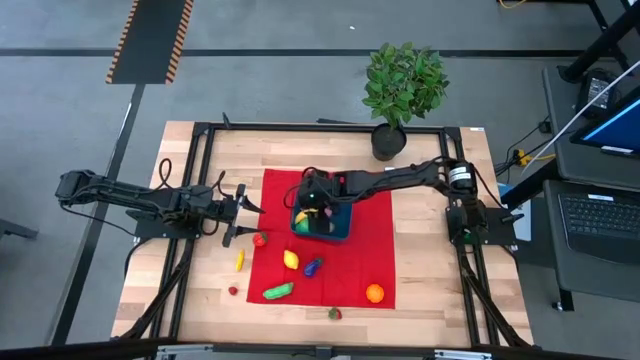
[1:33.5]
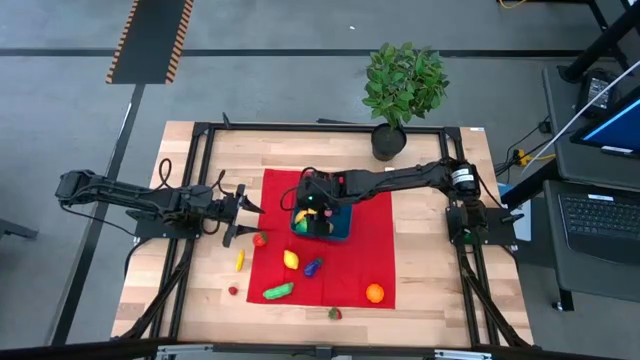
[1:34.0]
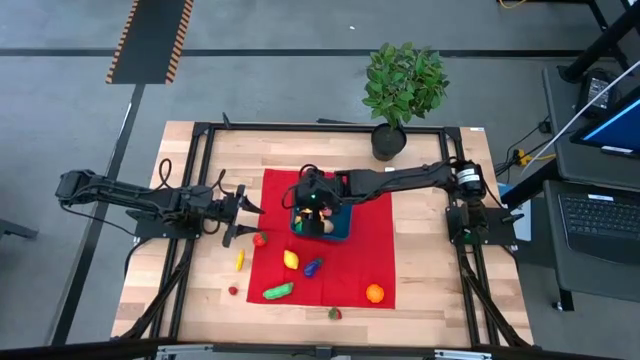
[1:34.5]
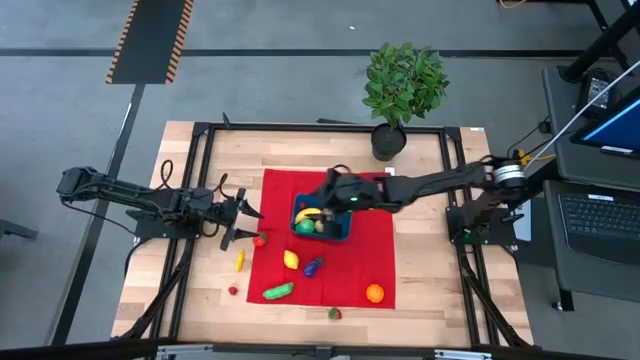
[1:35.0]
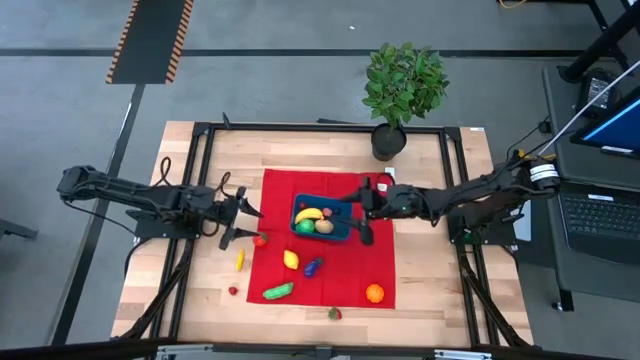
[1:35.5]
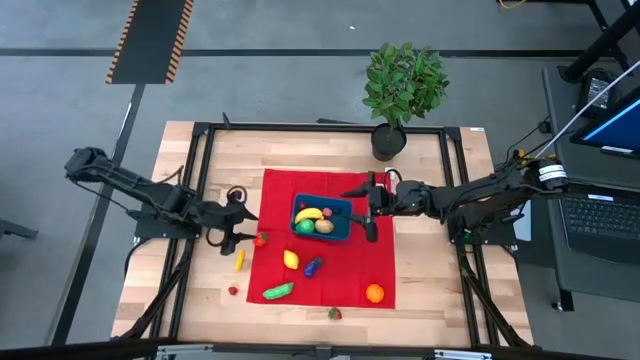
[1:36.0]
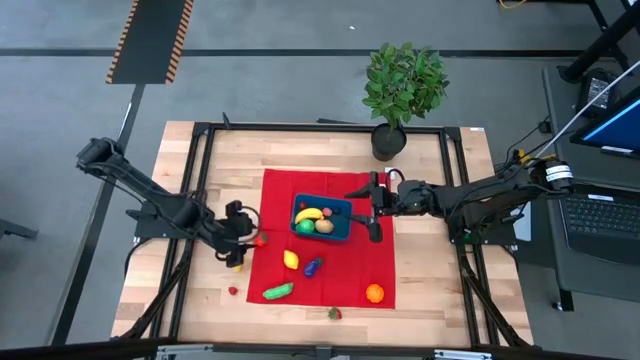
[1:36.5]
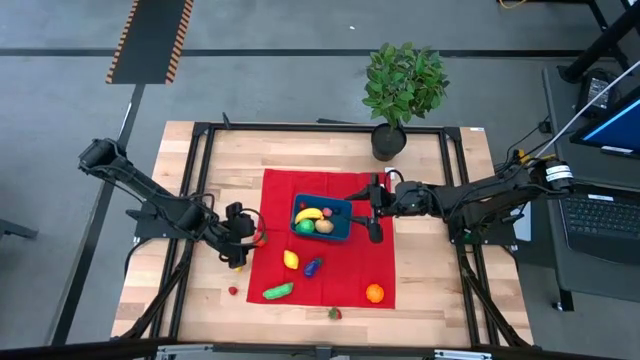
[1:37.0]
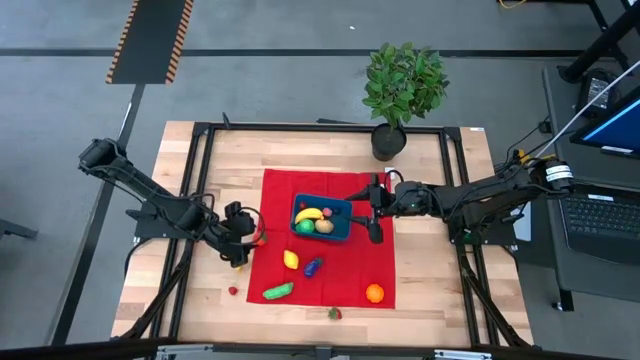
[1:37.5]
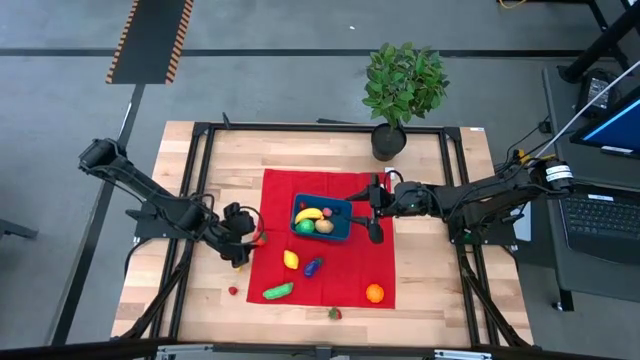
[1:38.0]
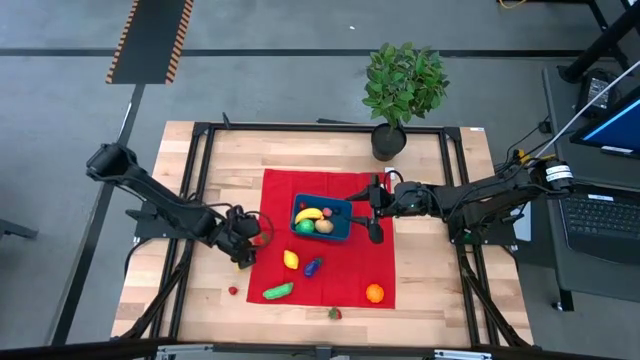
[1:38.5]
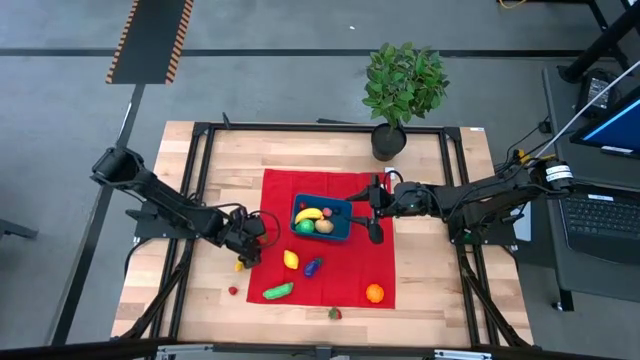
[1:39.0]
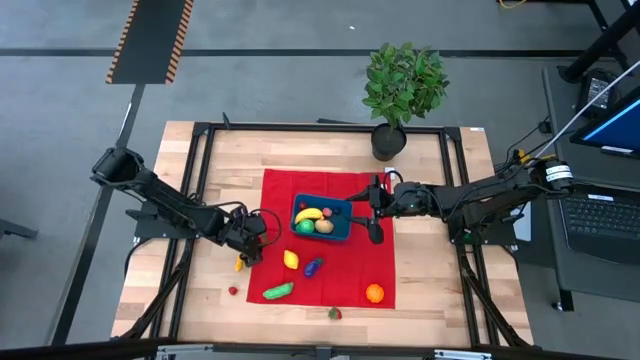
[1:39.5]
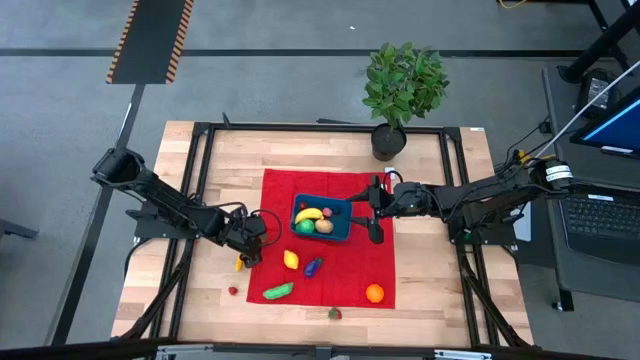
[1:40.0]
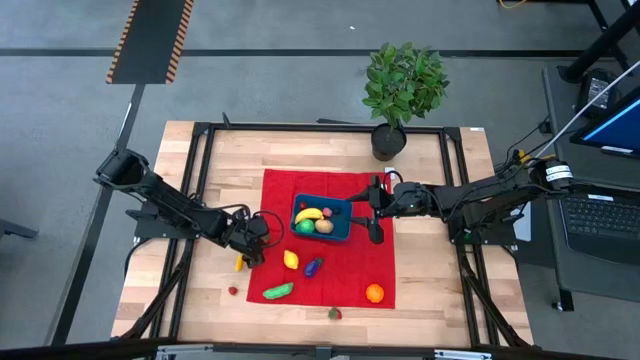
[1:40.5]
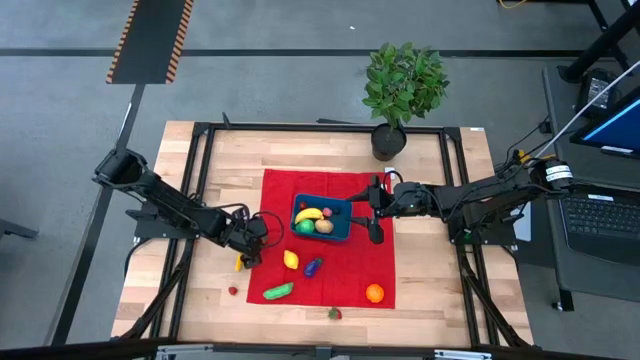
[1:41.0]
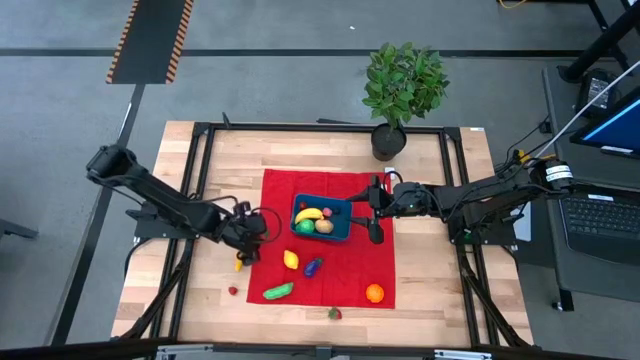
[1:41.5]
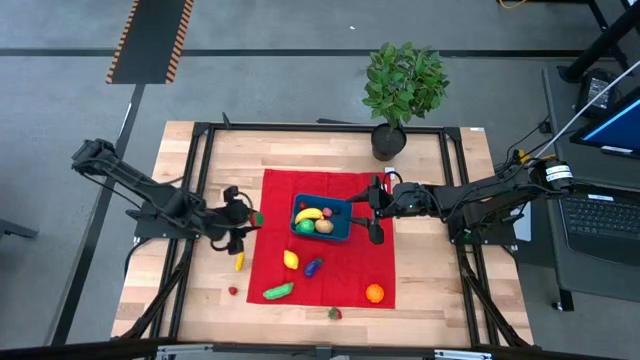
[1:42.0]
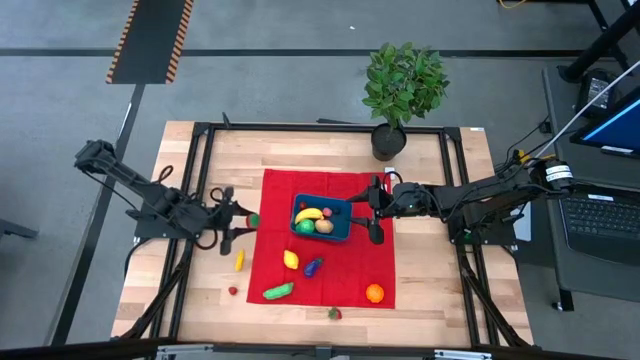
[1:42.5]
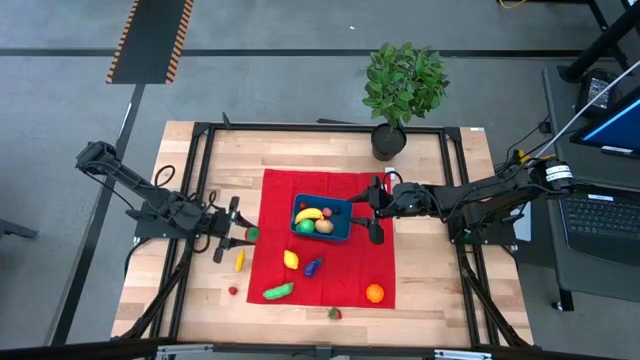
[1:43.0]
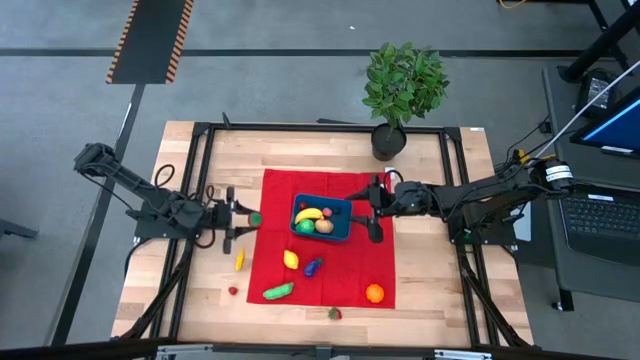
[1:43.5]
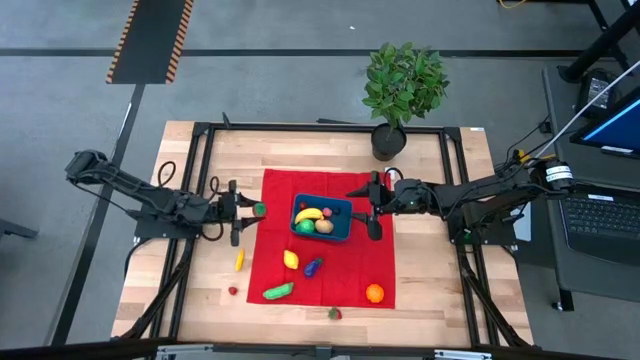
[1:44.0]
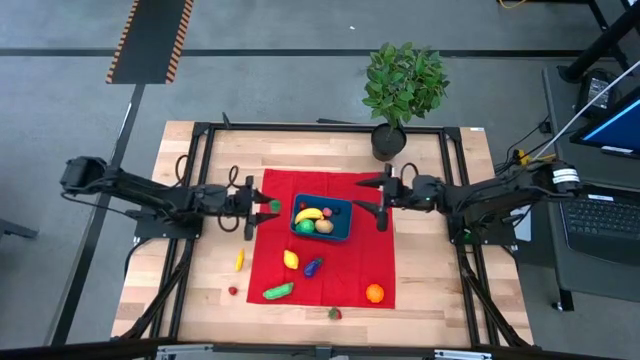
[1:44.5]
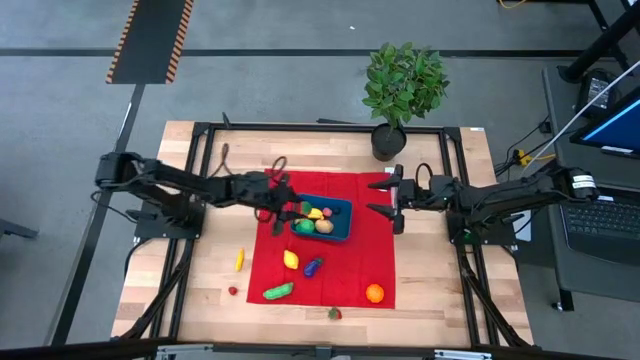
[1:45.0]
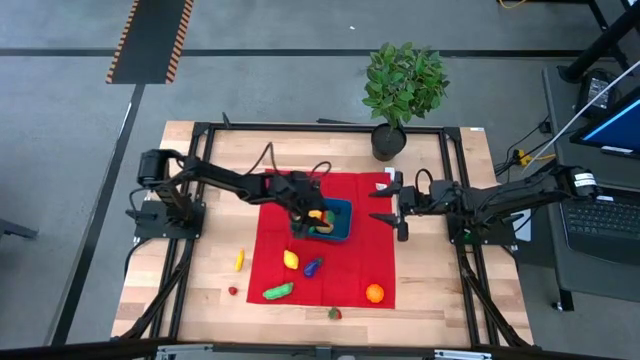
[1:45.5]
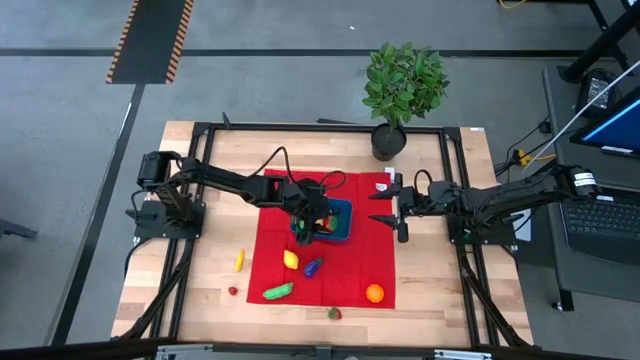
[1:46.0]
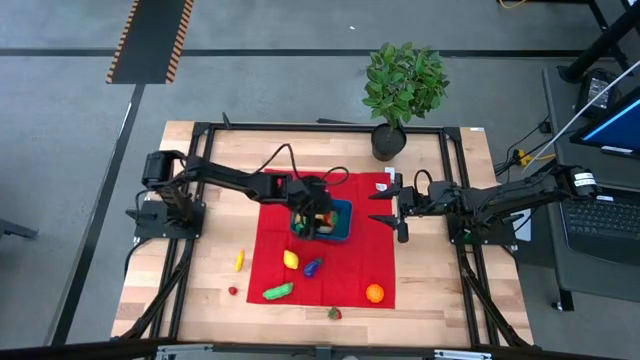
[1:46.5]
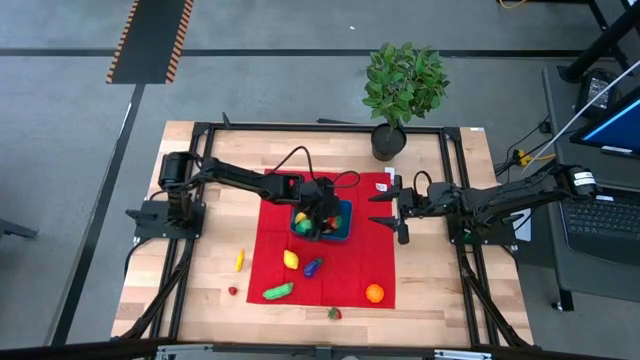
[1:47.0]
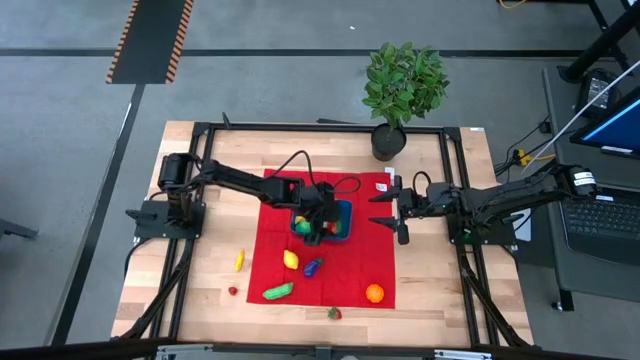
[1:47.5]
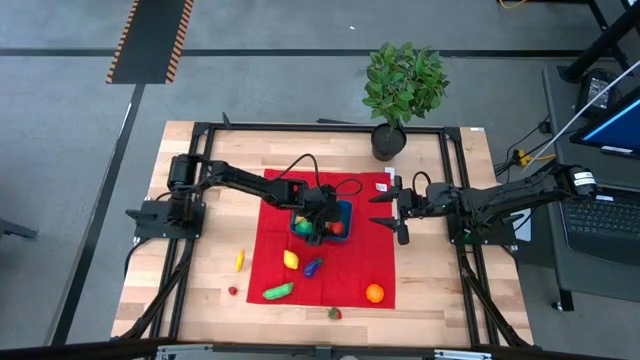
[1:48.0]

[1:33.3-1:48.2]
Task: Pick and placing Produce into tupperware
Put the left red strawberry into the blue bin

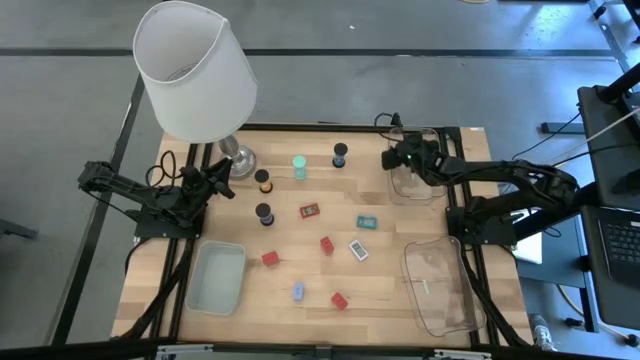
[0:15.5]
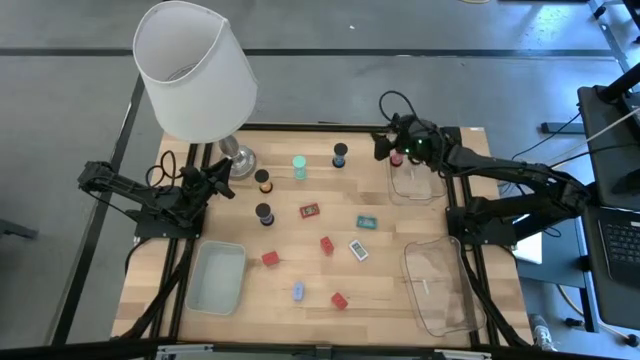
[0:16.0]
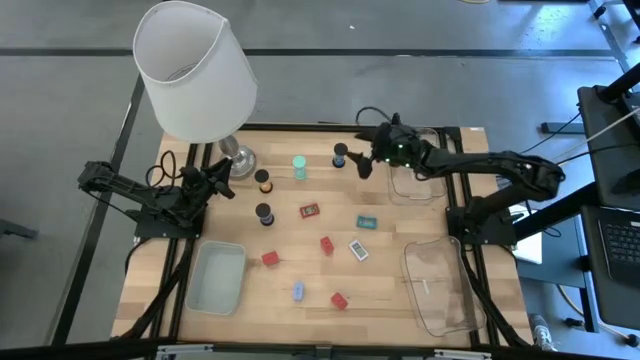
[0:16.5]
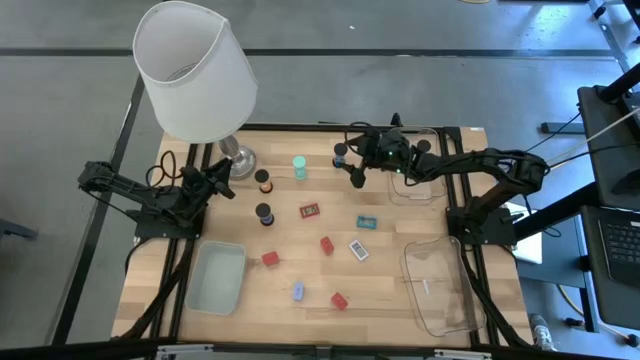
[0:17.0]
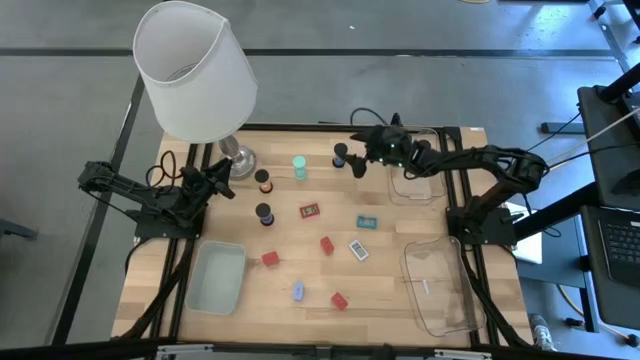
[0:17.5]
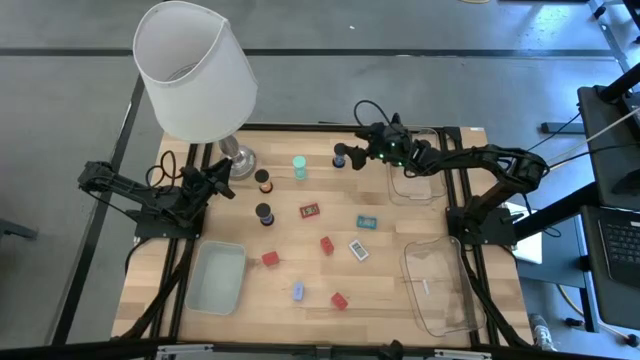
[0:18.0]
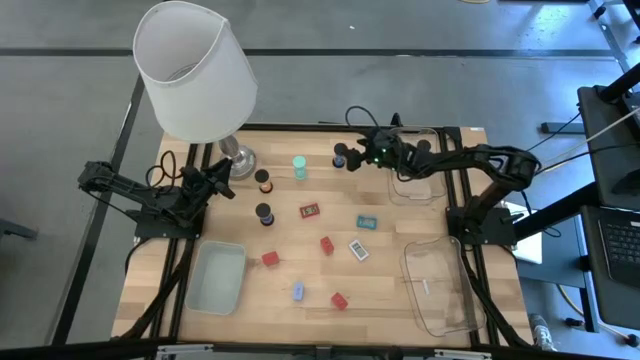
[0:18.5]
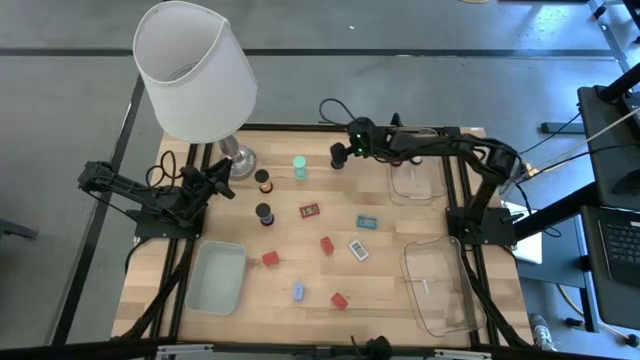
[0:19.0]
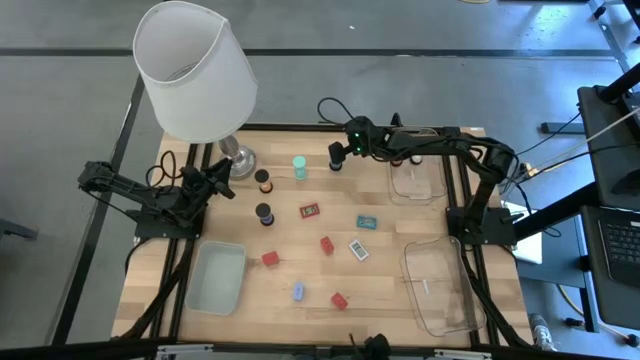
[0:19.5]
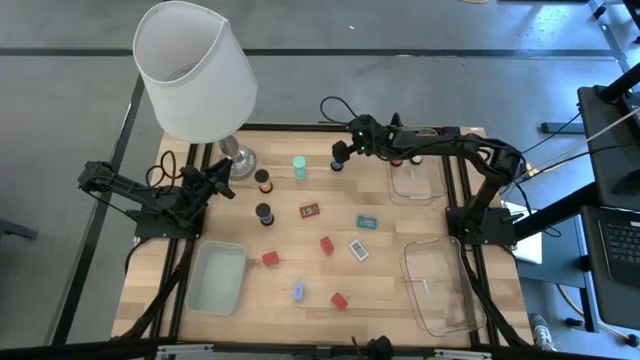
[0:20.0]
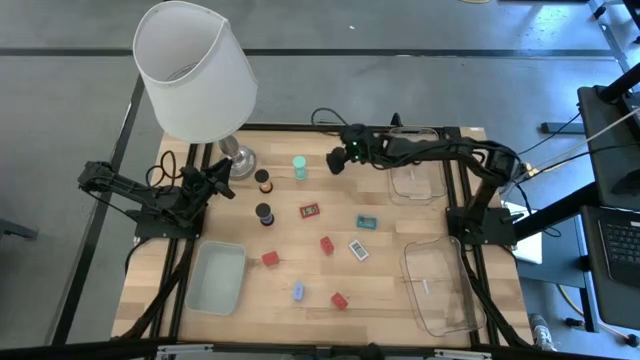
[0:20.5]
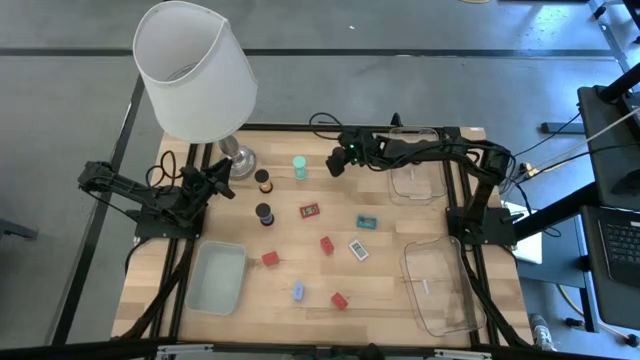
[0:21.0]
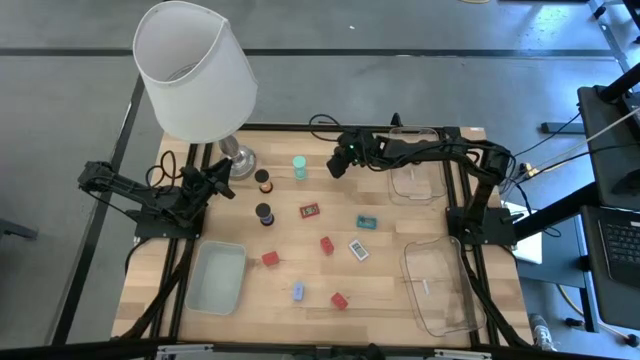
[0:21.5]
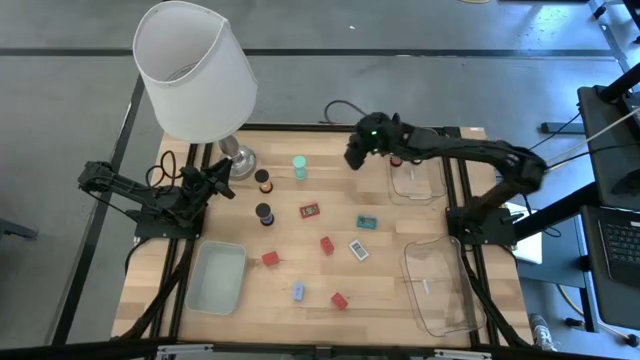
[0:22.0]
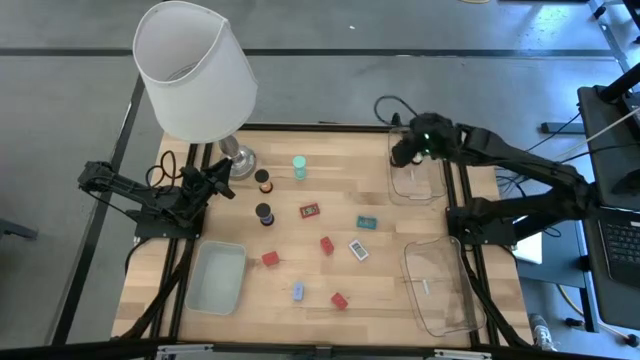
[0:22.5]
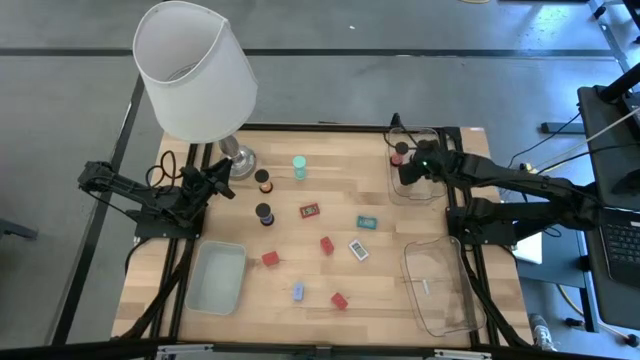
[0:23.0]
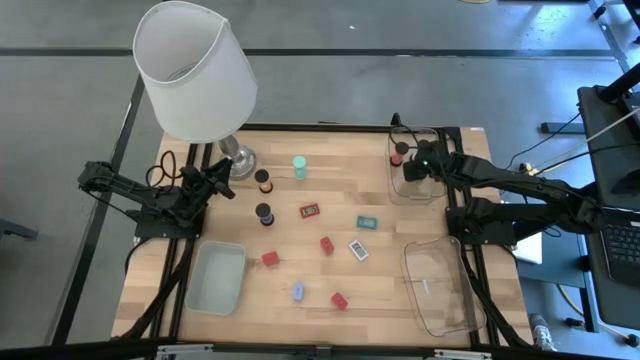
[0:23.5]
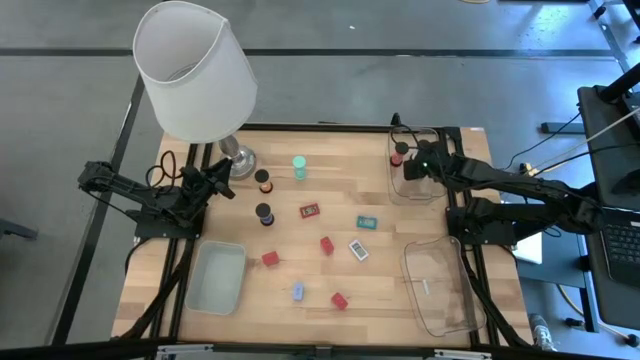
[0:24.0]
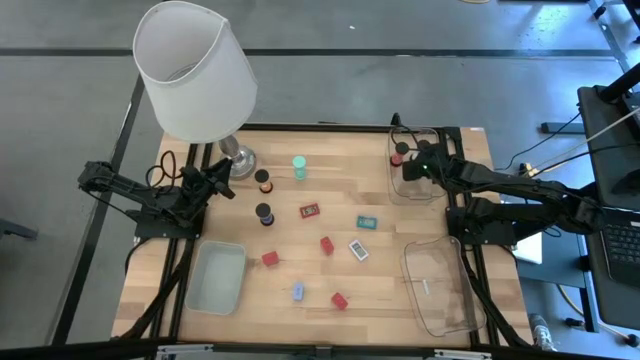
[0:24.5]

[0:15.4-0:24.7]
Task: Pick & Place Office items
Put the blue sand timer into the top transparent bin
